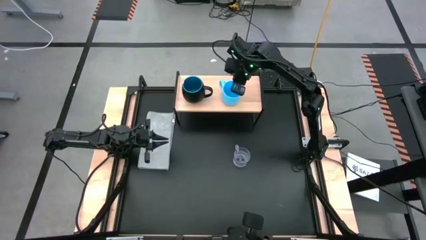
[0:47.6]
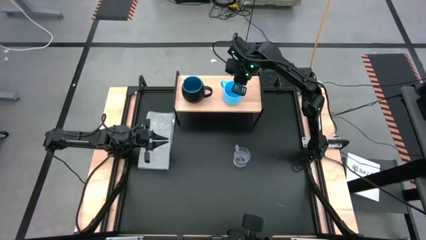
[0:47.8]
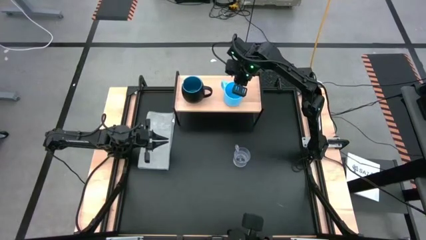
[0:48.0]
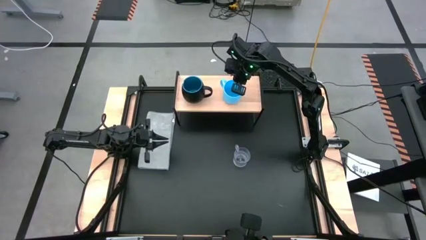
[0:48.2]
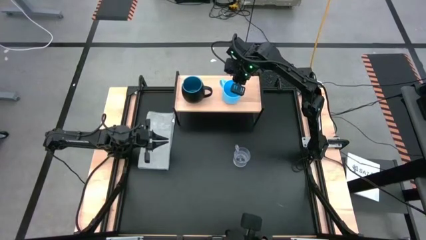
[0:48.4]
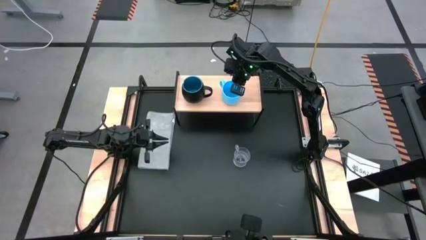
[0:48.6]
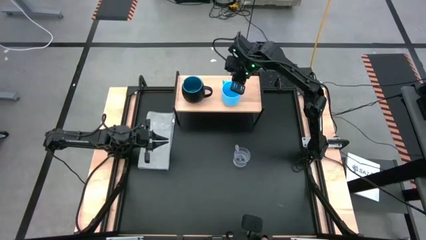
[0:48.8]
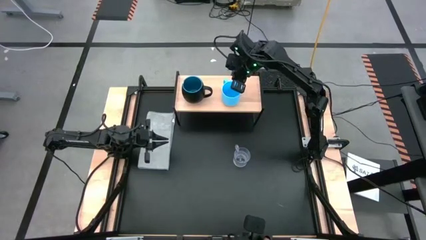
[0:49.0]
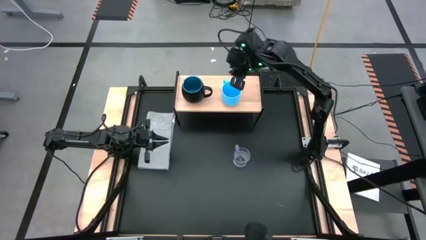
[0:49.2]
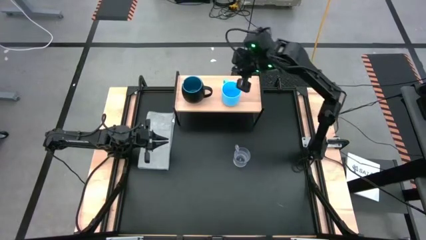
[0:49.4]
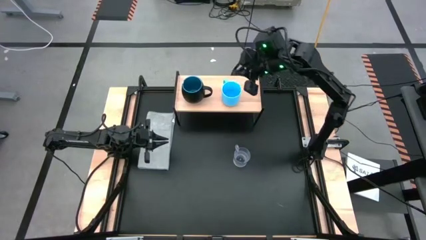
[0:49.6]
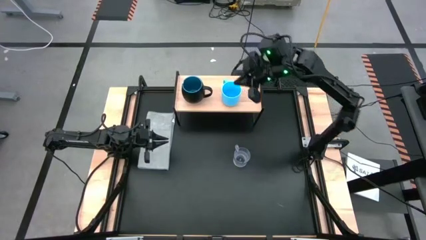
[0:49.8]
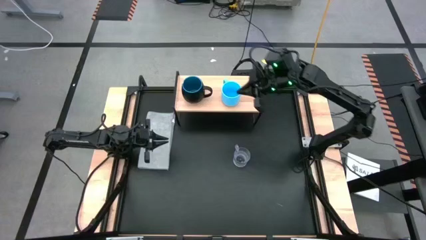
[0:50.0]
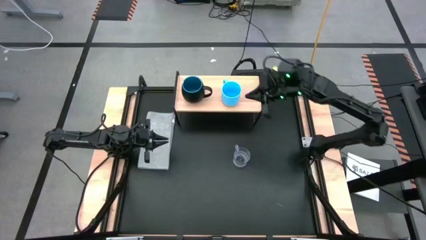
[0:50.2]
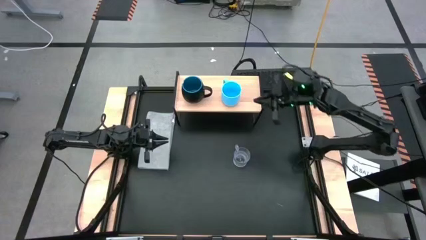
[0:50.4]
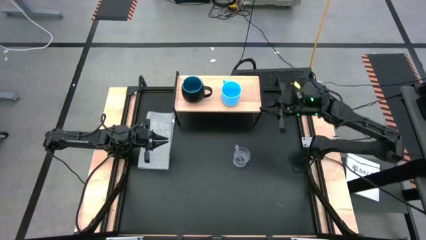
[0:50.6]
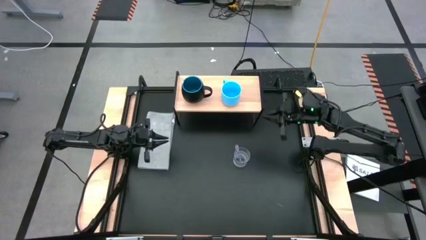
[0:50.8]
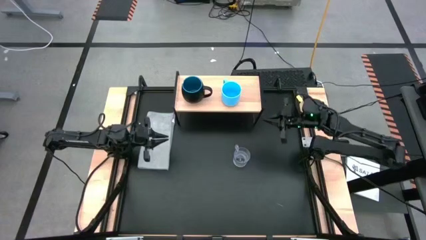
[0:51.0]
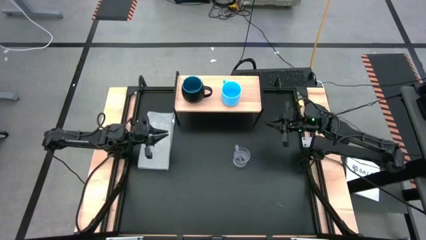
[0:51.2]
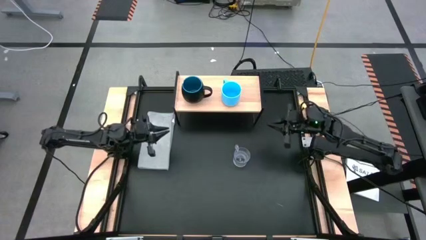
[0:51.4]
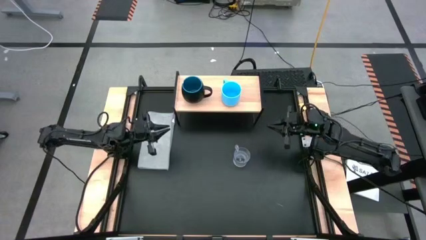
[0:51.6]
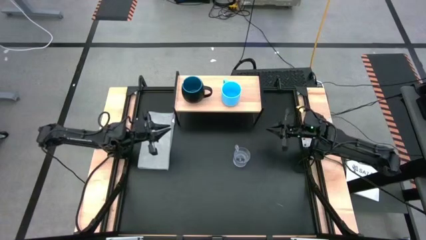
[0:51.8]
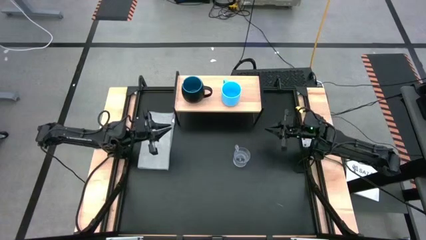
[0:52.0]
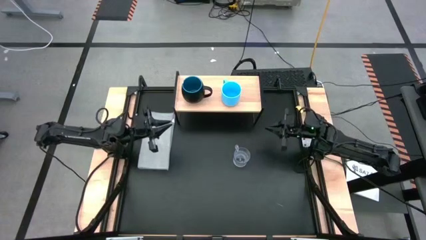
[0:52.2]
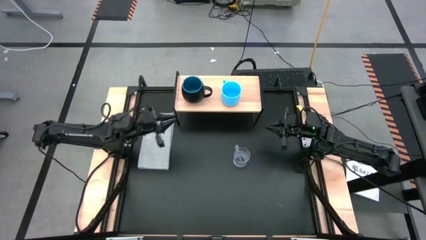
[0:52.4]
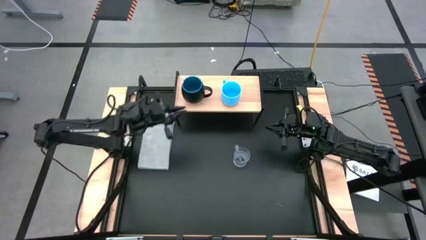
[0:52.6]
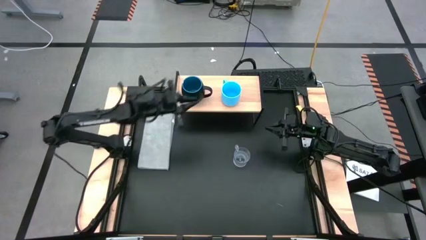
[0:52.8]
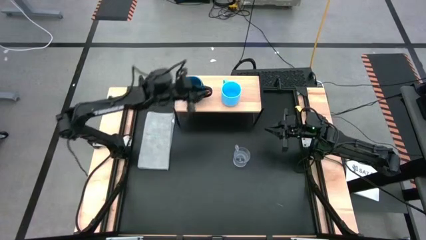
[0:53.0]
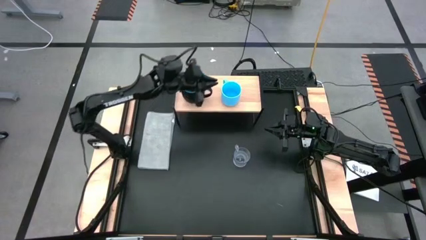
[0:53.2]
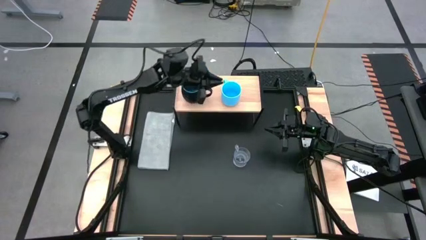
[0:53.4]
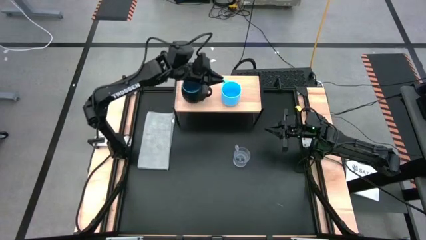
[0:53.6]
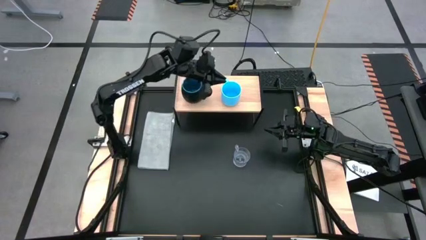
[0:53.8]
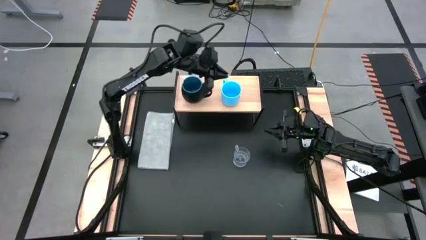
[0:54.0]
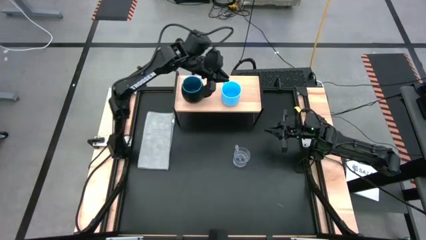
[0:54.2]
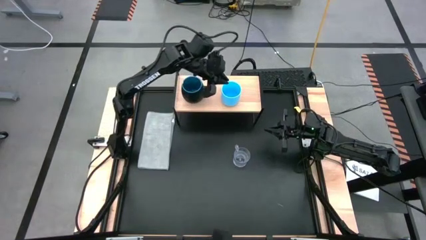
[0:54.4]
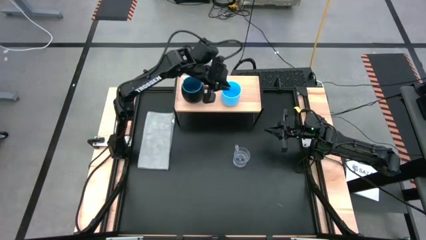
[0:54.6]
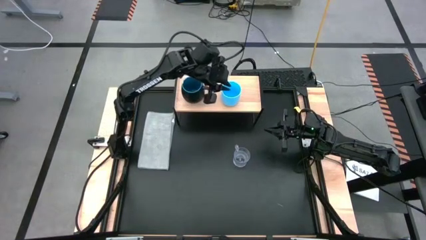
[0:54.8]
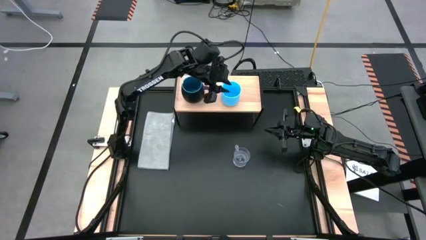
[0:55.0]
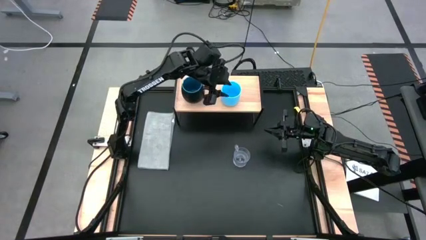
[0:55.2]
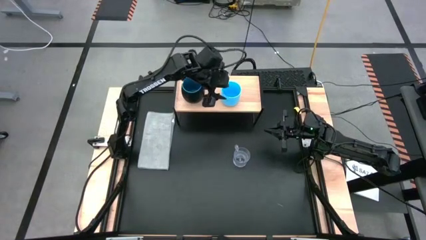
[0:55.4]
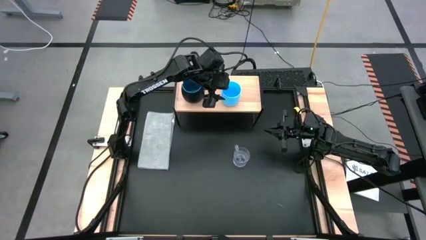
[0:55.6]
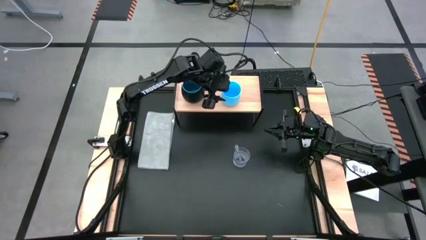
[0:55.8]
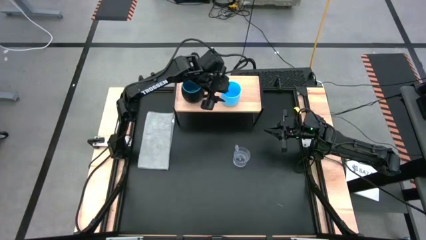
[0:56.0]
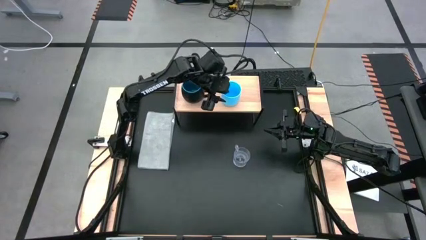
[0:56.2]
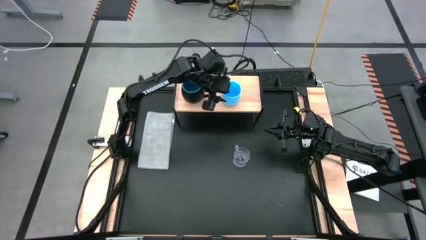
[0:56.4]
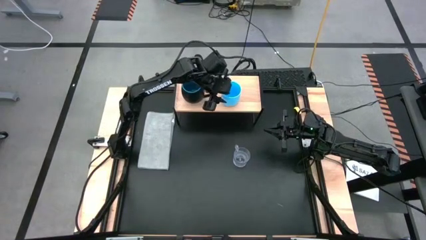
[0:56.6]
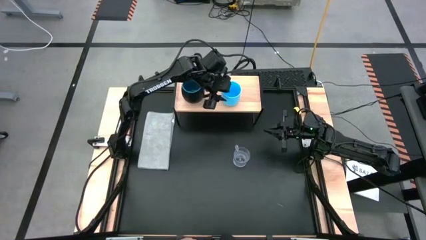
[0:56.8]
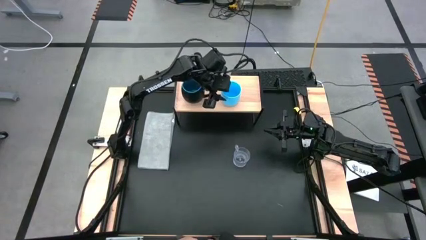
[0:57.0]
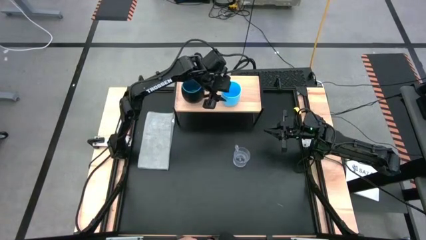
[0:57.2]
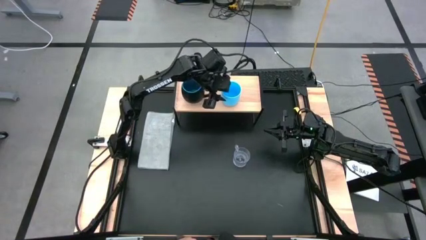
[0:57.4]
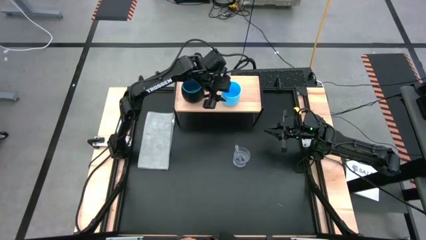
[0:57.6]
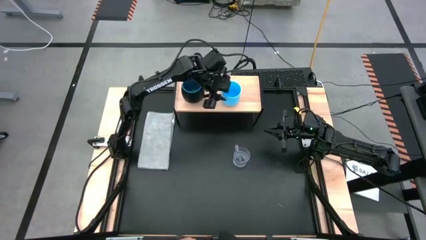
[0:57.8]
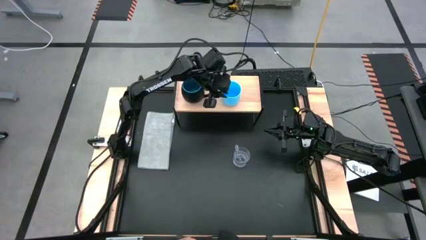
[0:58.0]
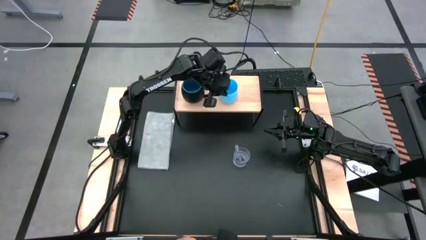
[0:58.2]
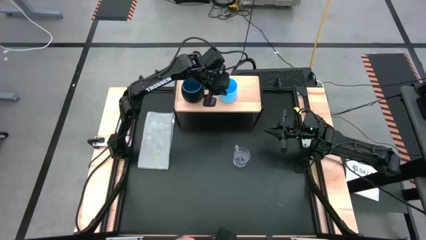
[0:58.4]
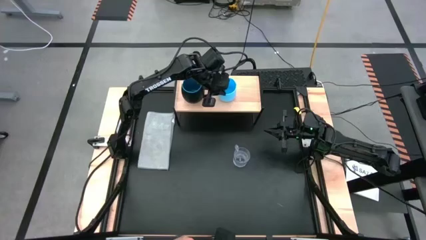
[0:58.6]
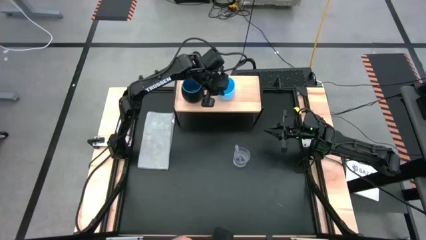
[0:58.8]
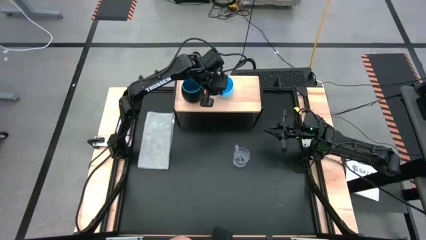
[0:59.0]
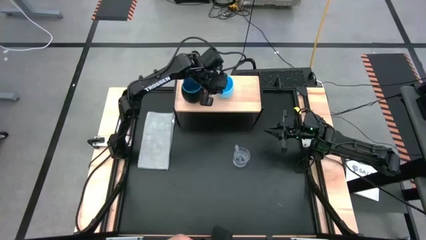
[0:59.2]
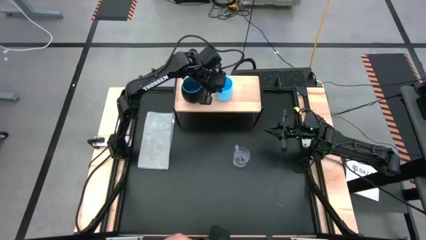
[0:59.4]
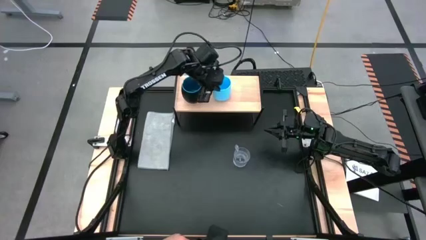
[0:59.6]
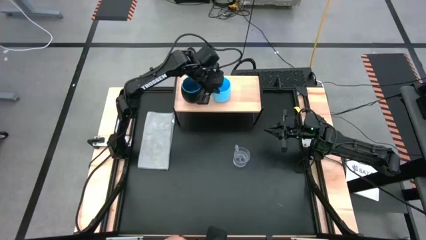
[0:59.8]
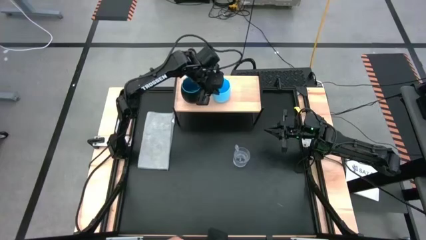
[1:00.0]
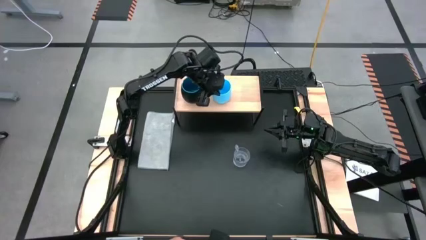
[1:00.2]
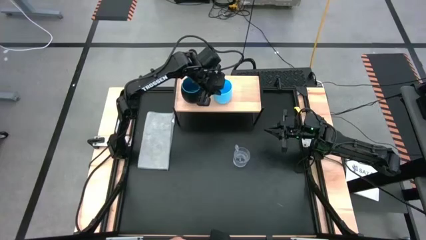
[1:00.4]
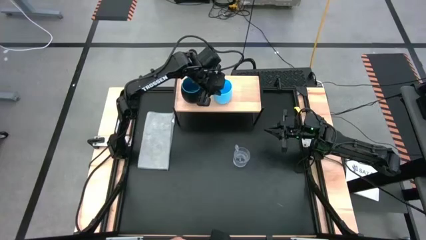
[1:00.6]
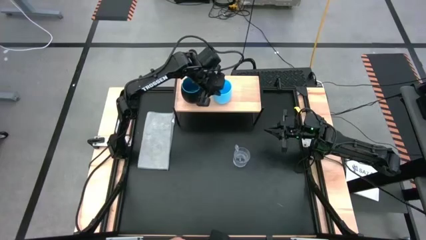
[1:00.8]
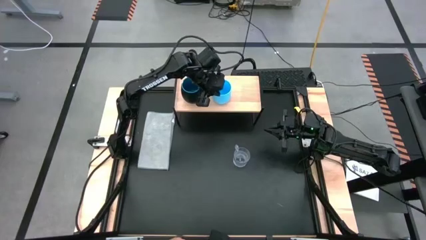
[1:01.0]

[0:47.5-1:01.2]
Task: Stack small to large cups/mugs on shelf
Put the blue cup on the shelf

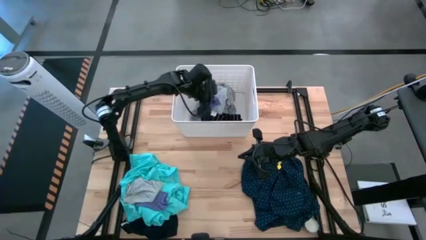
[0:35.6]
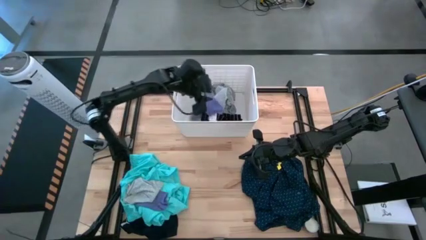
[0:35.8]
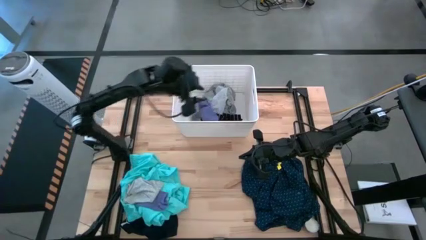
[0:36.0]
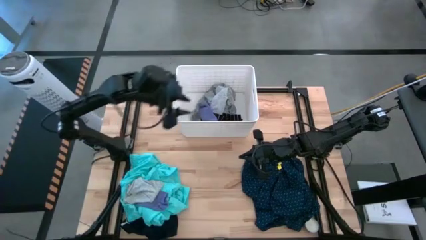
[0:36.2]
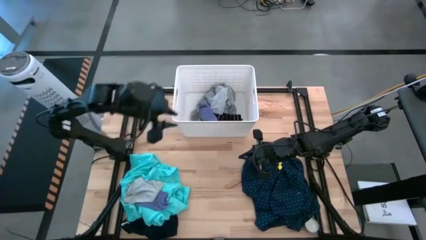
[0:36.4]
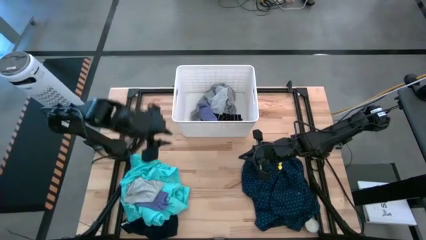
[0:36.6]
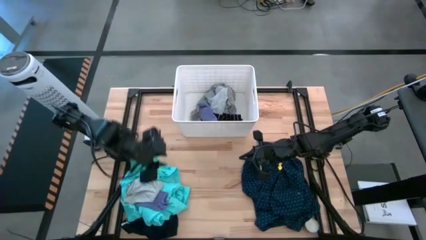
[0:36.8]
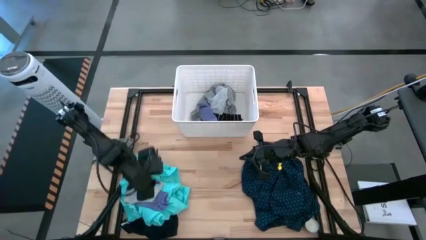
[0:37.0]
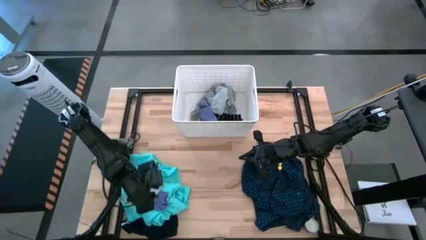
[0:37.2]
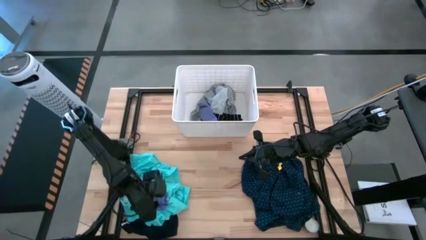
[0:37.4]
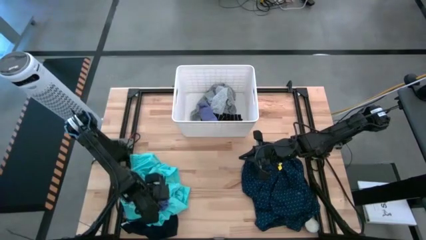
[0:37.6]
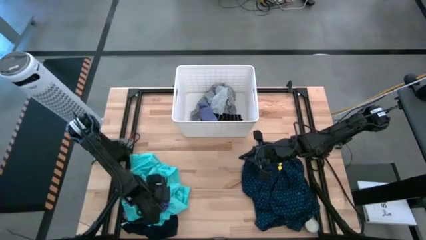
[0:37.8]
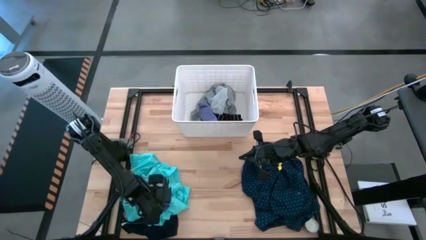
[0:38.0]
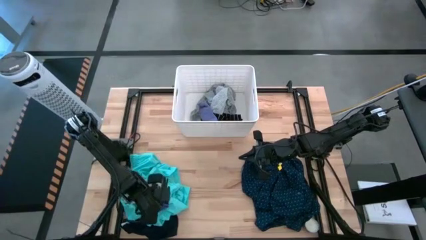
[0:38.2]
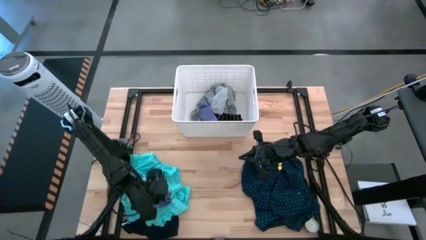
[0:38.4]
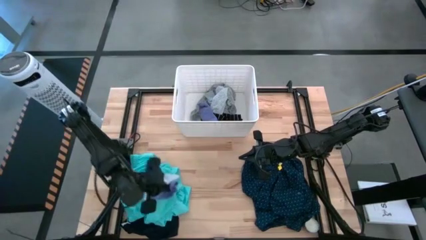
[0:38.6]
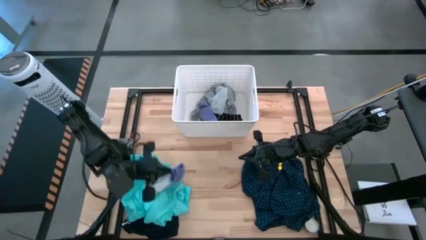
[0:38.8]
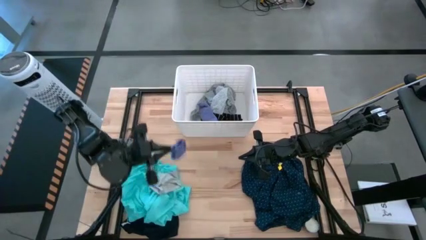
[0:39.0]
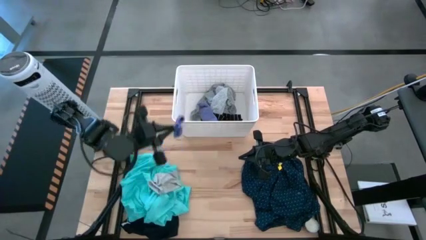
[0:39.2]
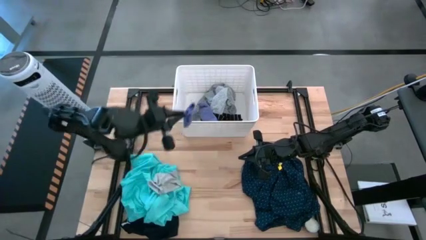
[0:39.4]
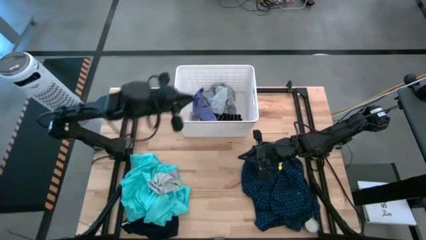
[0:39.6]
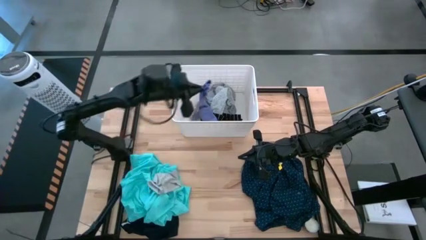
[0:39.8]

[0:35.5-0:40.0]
Task: Sort clothes
Put the purple sock into the white laundry bin
